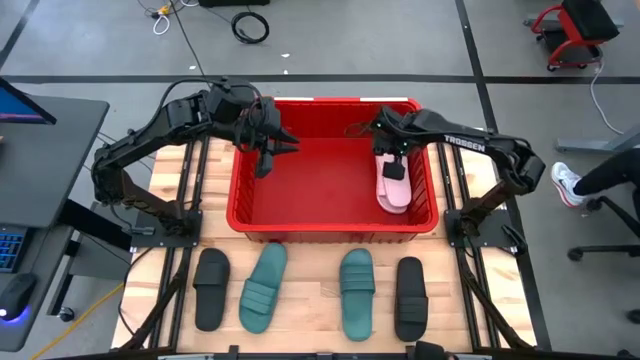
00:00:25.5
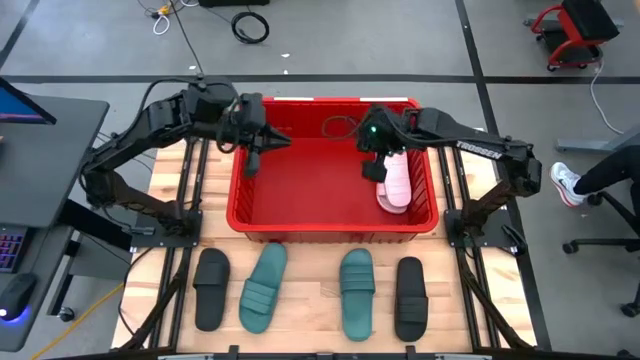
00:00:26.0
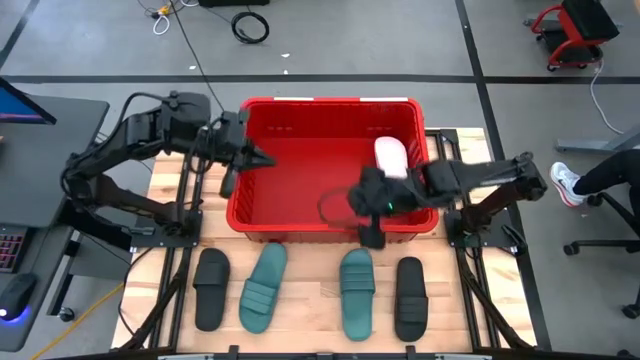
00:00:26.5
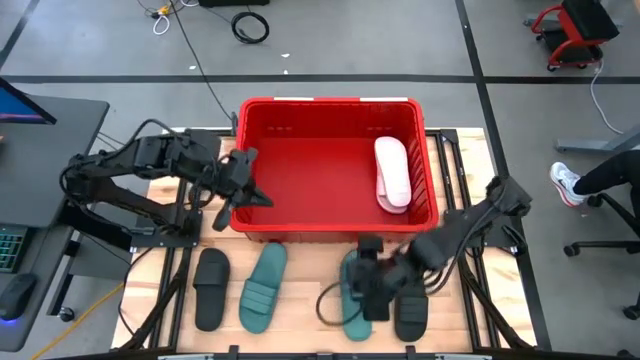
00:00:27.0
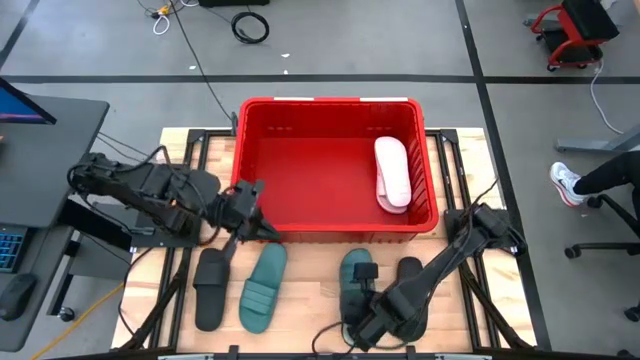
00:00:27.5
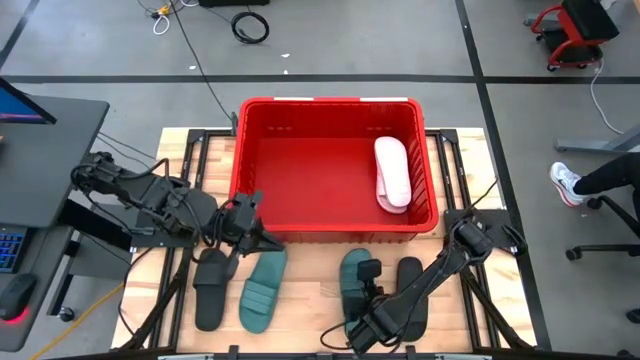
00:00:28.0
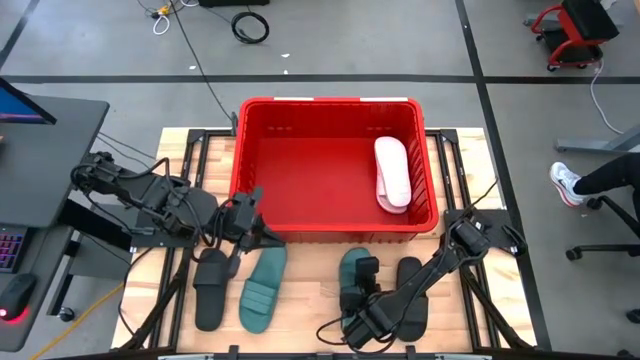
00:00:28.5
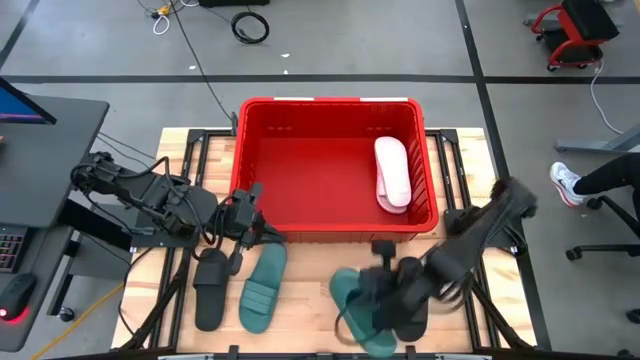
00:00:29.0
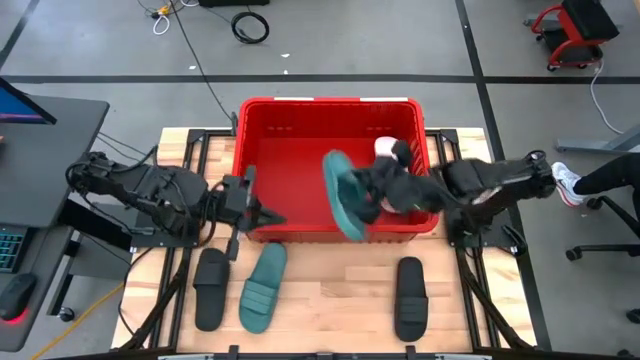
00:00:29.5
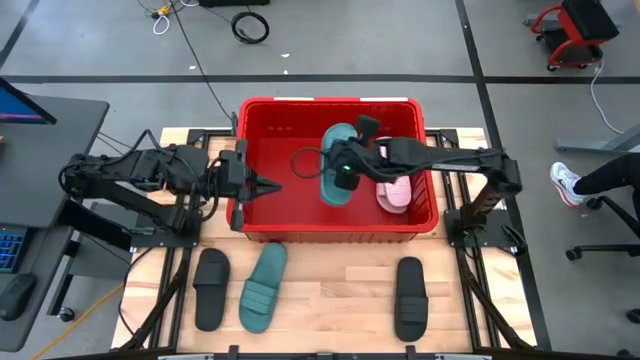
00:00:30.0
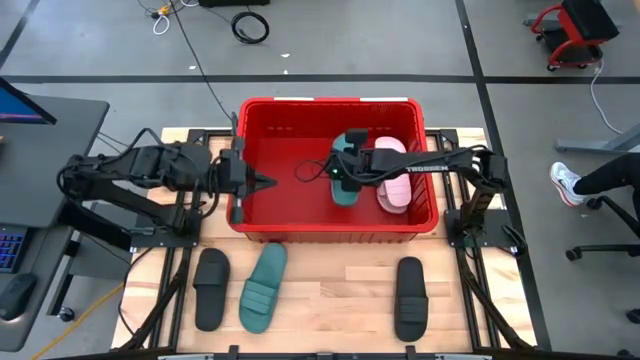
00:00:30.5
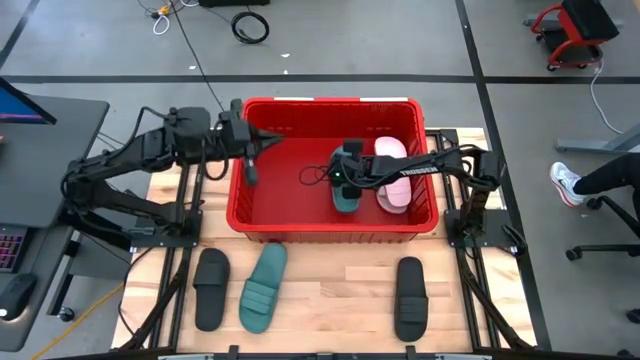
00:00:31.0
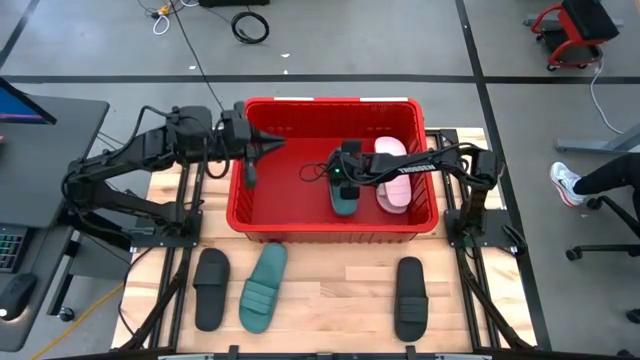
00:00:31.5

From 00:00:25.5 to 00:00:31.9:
Task: Pick and place slides into bin
Put the right blue slipper into the red bin

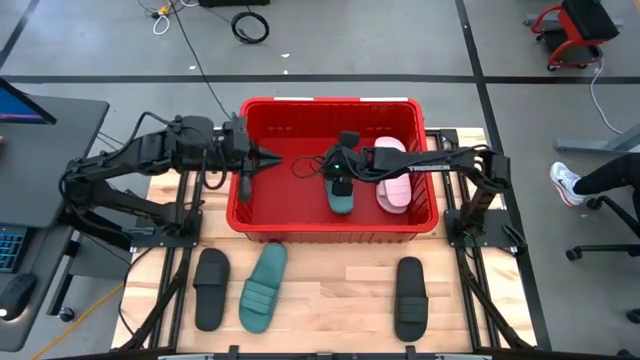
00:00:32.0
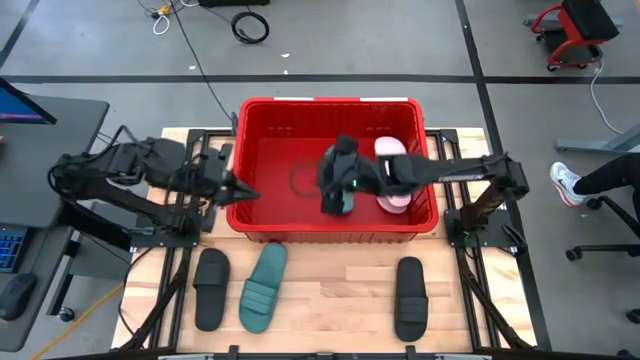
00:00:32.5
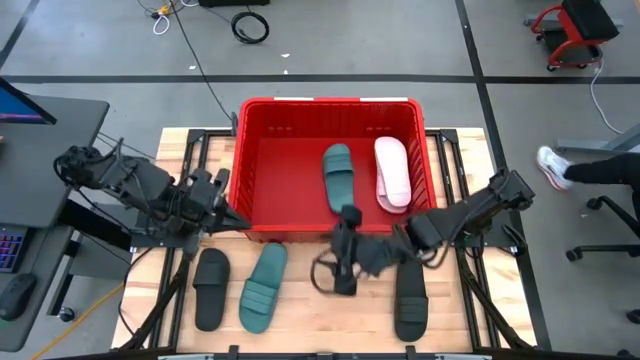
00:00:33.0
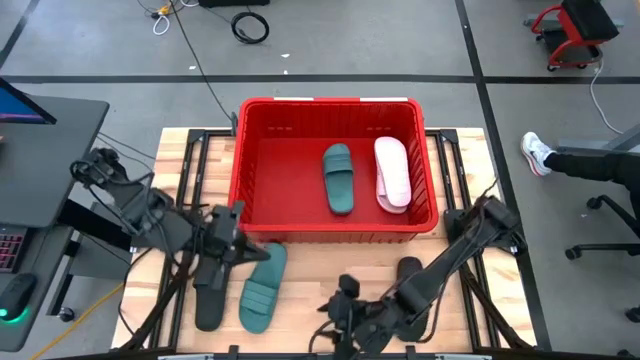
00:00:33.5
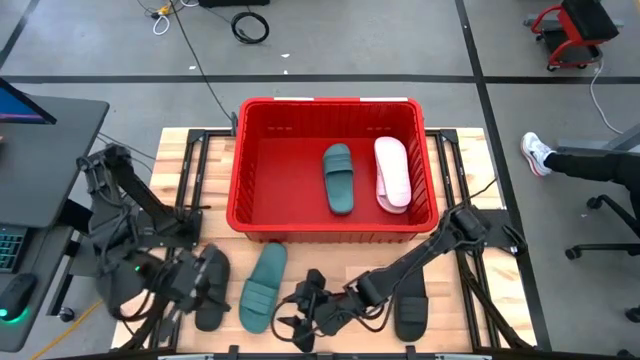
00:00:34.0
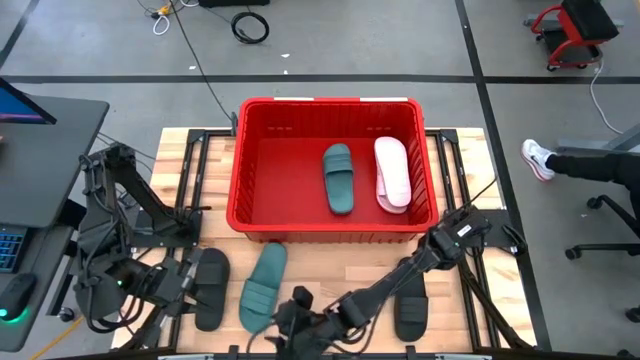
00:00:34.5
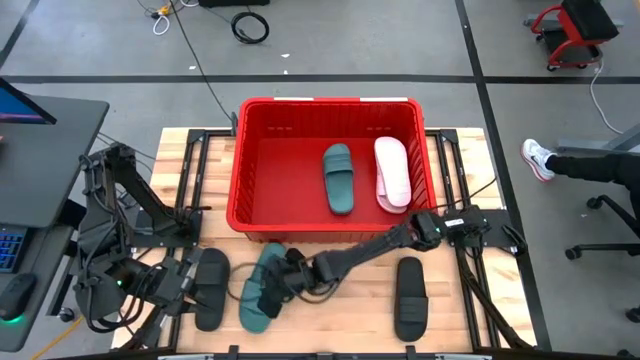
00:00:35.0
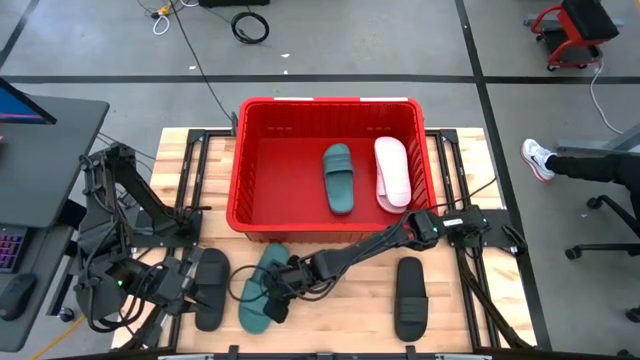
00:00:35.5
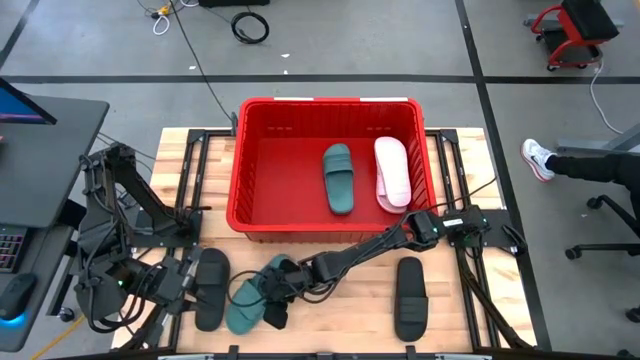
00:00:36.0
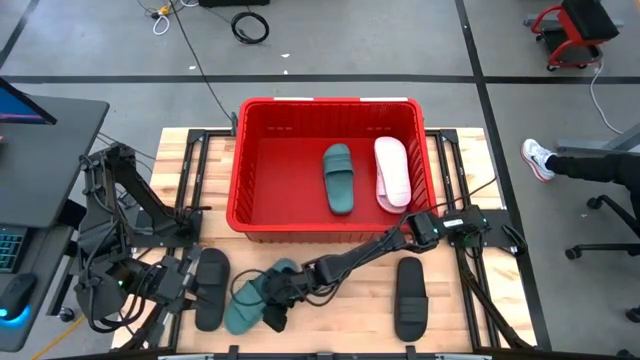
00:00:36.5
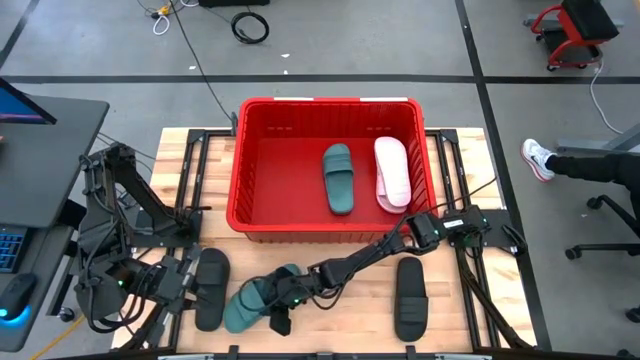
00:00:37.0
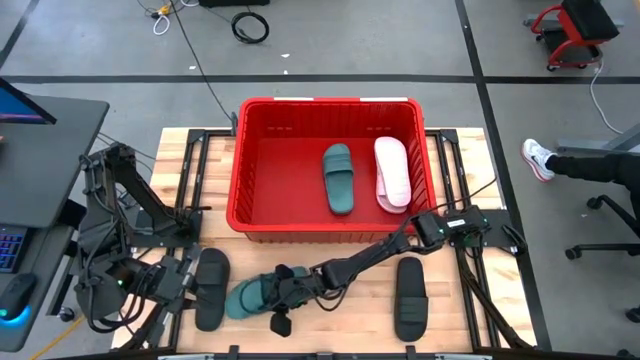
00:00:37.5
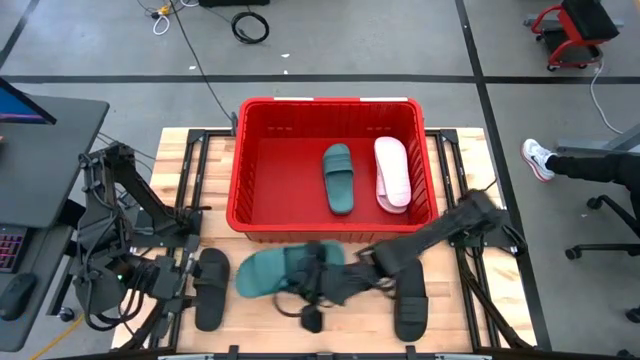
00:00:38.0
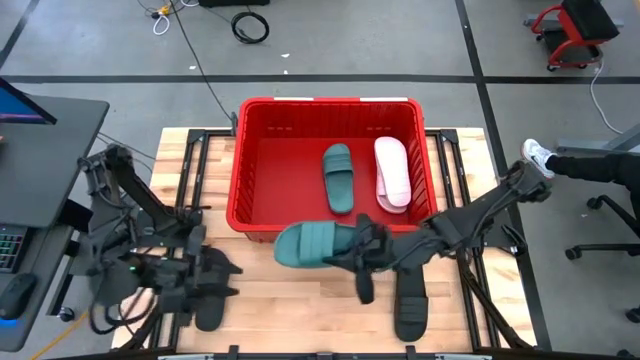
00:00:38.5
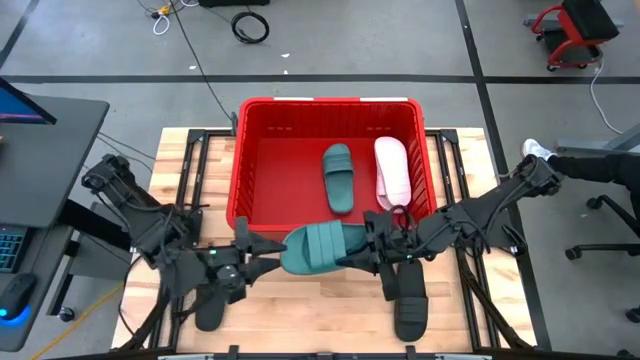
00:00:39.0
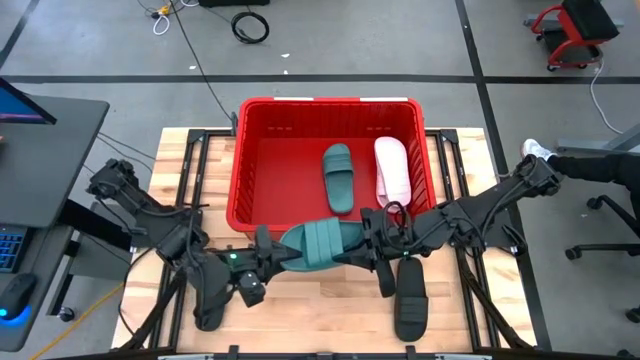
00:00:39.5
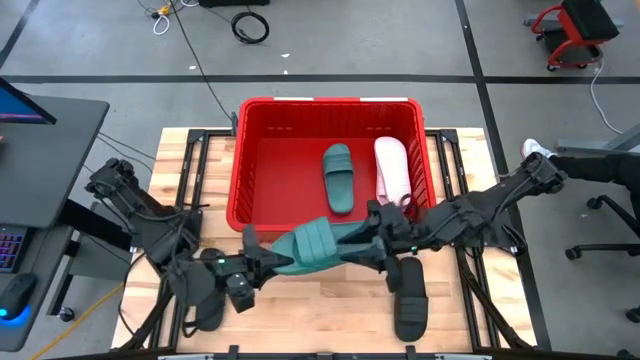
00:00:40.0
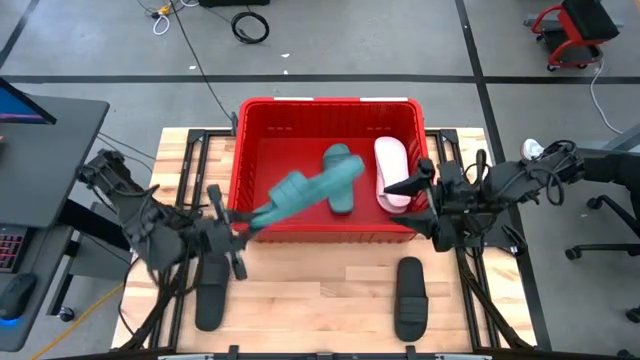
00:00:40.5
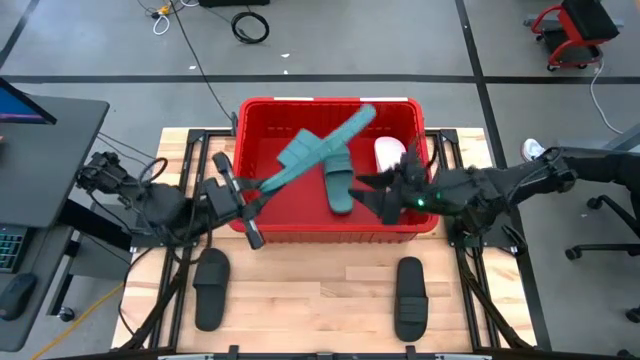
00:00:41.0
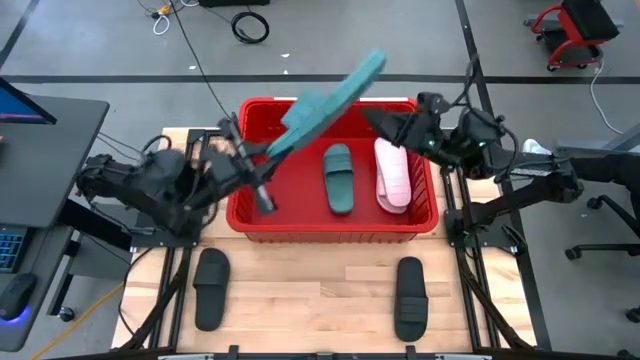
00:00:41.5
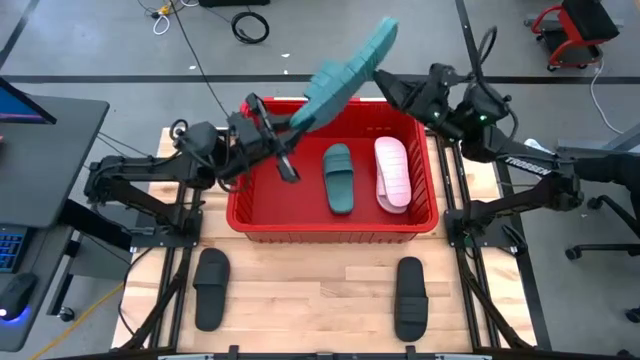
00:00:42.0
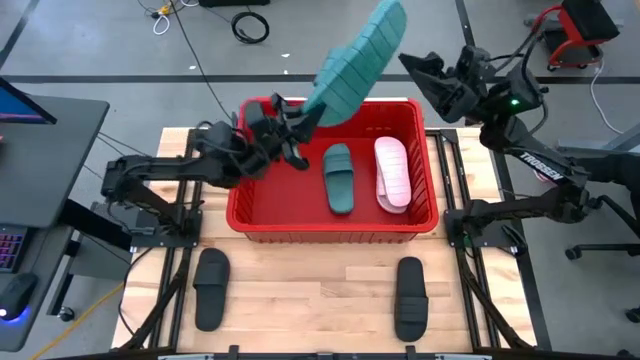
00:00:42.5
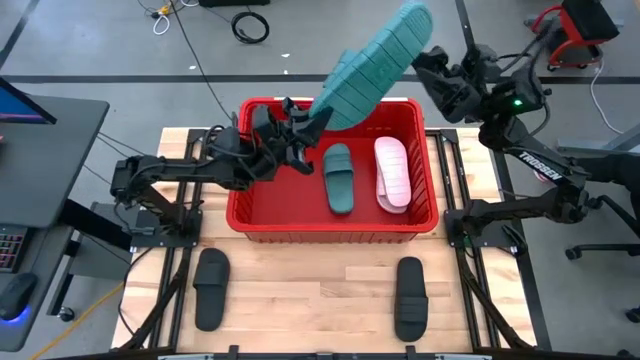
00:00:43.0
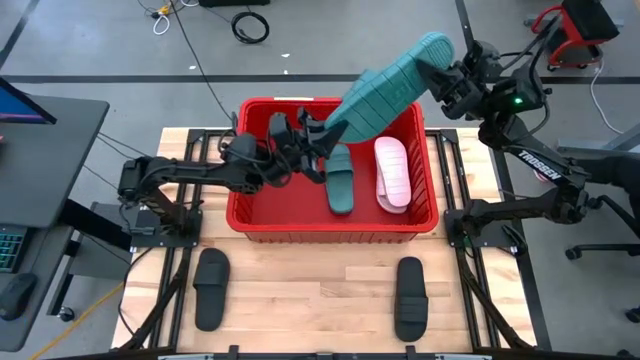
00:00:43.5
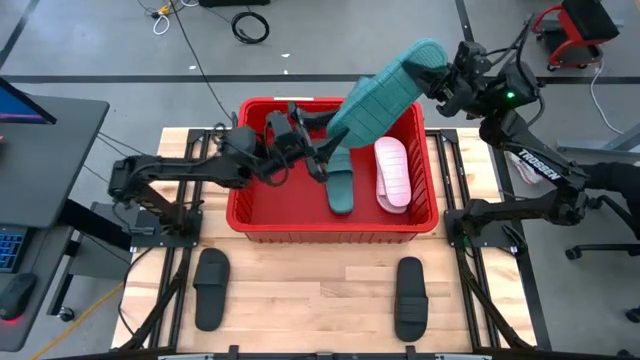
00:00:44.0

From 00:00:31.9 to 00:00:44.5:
Stack the blue slipper on top of the other blue slipper in the red bin

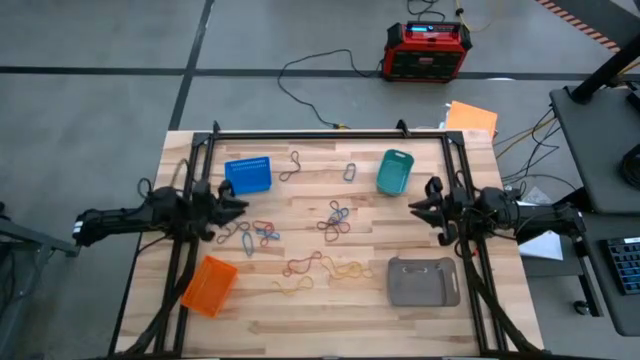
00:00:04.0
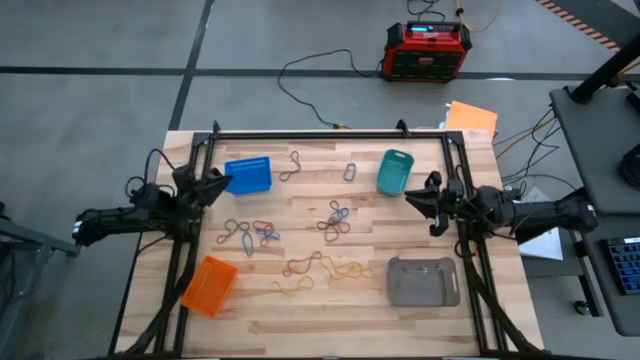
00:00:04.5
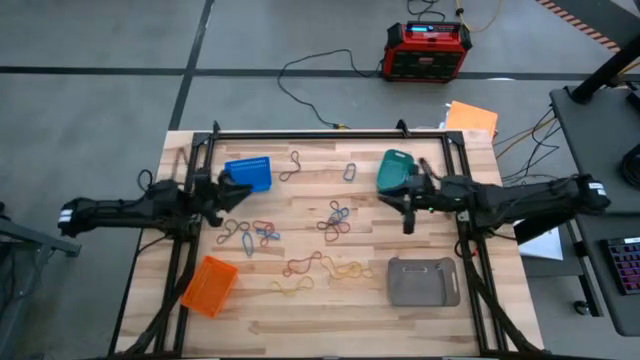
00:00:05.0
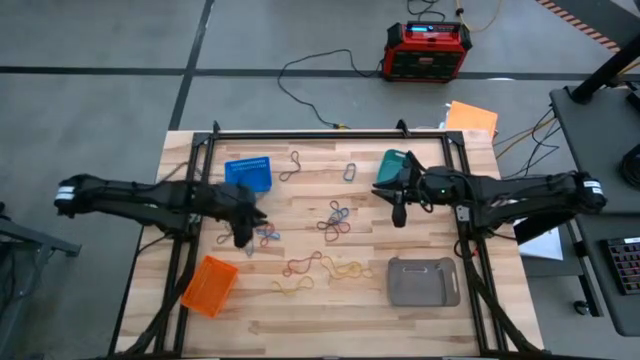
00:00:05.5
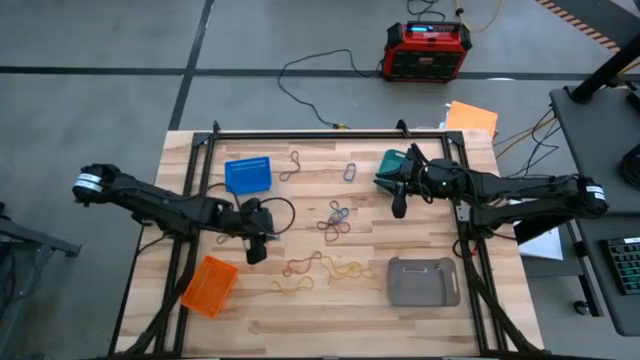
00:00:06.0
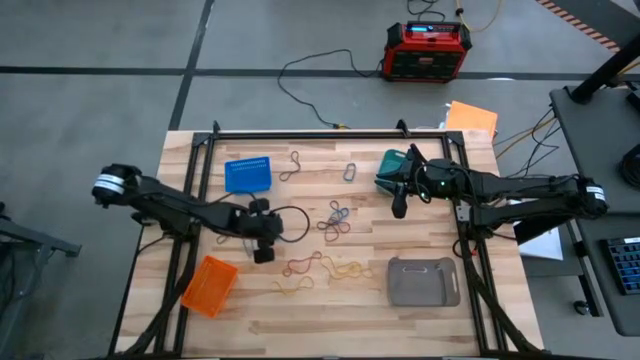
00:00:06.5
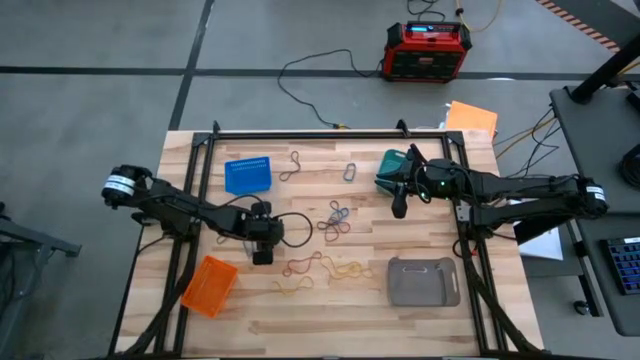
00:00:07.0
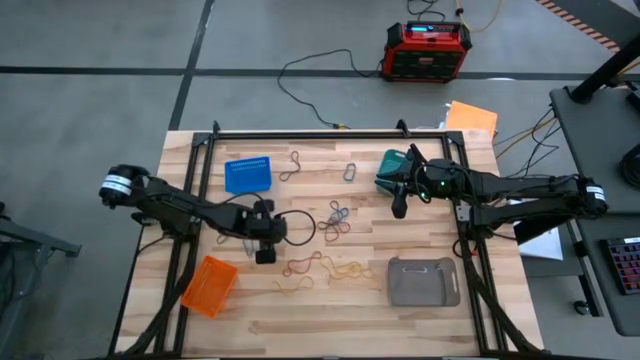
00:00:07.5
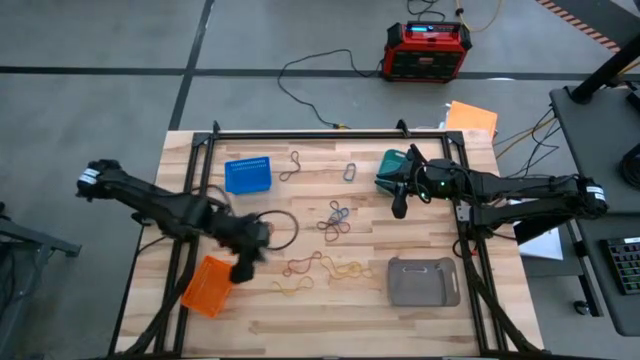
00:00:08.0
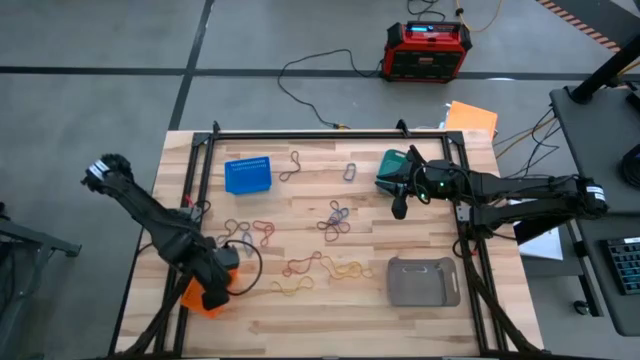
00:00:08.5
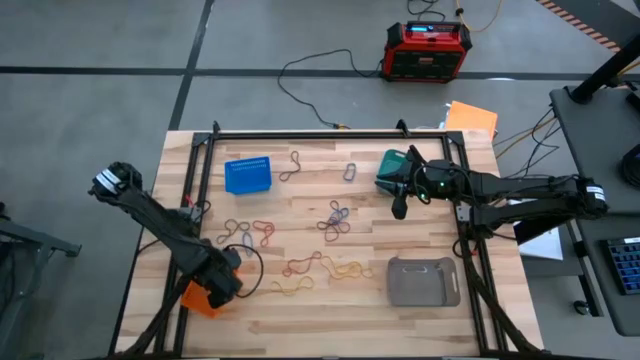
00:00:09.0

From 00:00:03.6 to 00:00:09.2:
Task: Sort rubber bands into baskets
Put the middle left blue rubber band into the orange bin
